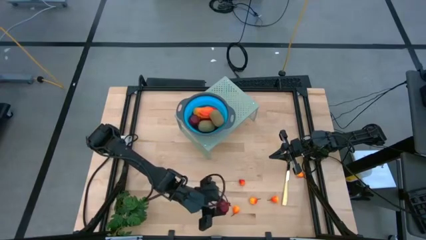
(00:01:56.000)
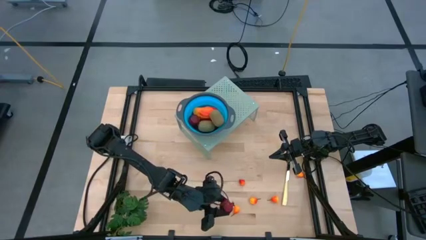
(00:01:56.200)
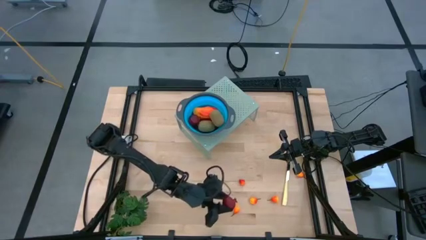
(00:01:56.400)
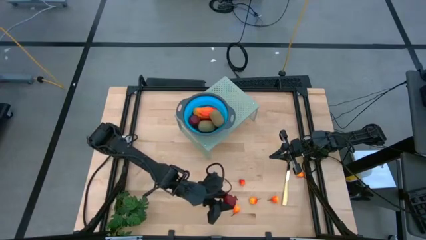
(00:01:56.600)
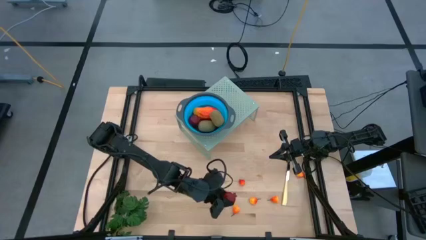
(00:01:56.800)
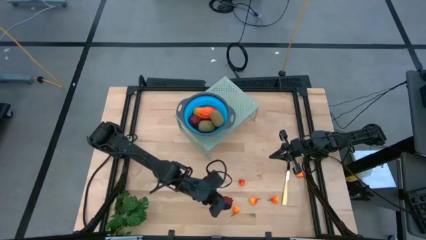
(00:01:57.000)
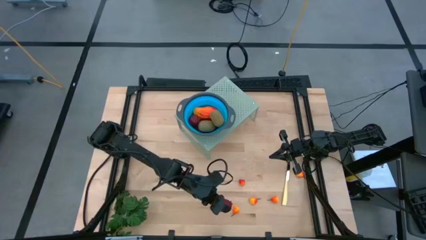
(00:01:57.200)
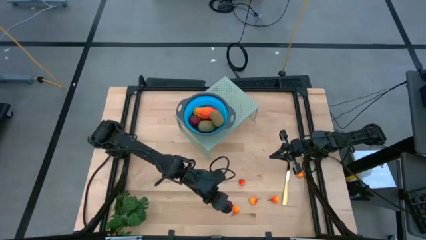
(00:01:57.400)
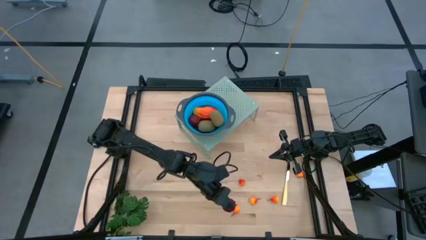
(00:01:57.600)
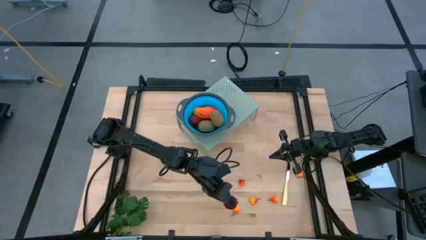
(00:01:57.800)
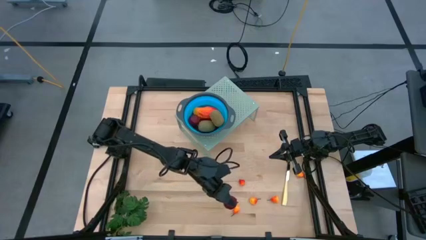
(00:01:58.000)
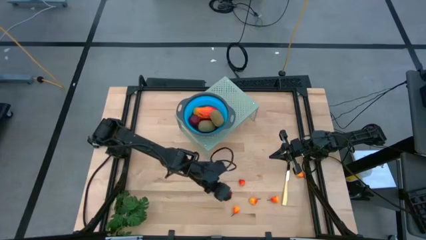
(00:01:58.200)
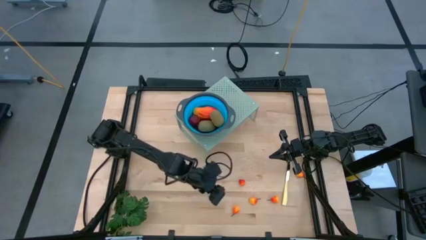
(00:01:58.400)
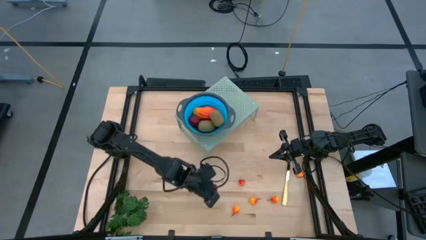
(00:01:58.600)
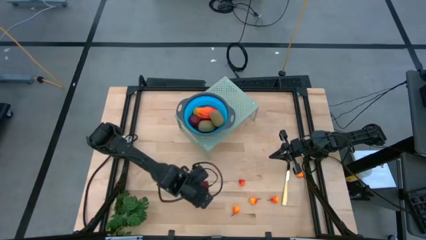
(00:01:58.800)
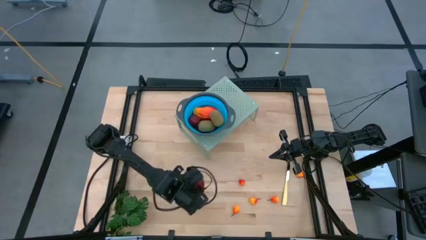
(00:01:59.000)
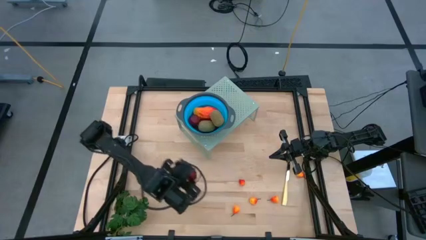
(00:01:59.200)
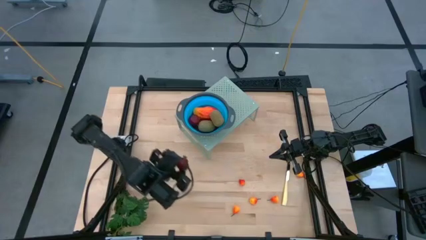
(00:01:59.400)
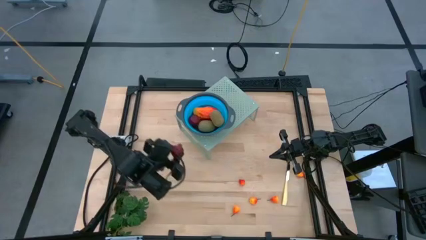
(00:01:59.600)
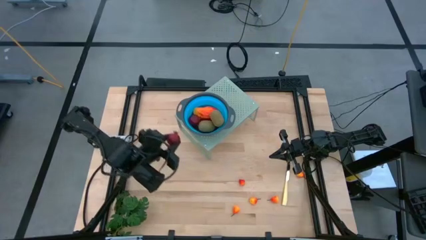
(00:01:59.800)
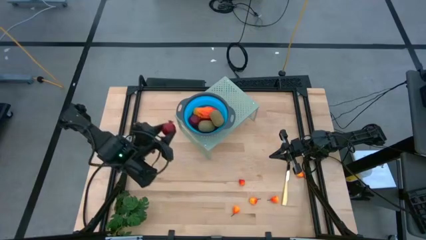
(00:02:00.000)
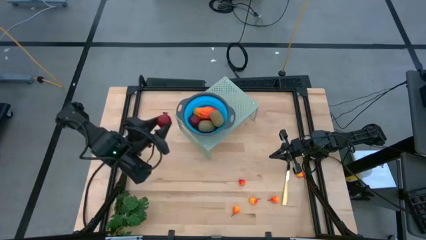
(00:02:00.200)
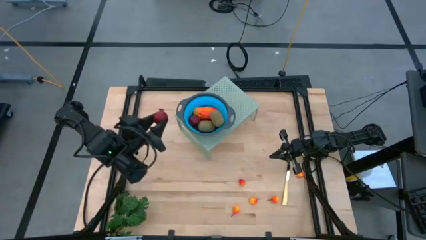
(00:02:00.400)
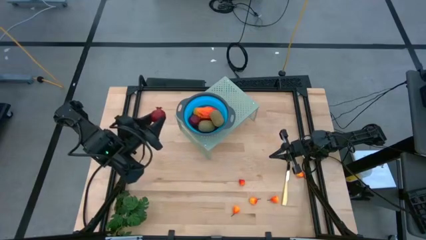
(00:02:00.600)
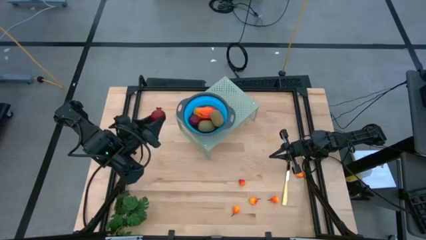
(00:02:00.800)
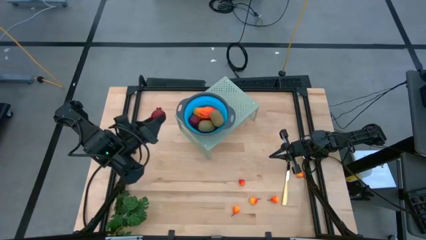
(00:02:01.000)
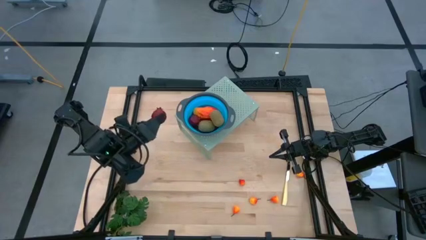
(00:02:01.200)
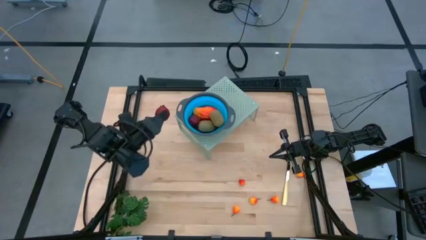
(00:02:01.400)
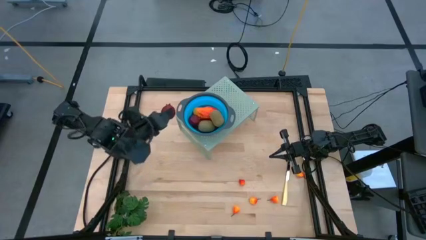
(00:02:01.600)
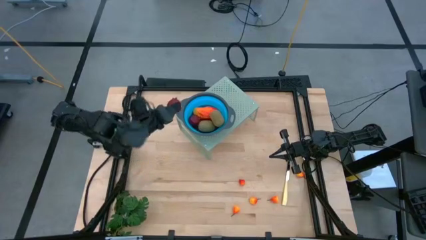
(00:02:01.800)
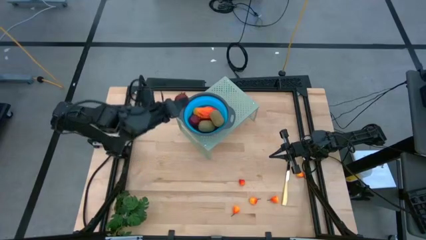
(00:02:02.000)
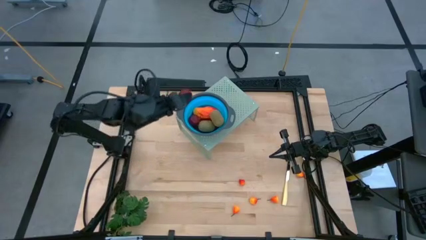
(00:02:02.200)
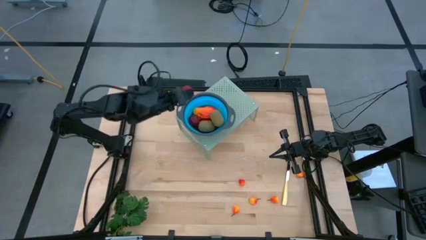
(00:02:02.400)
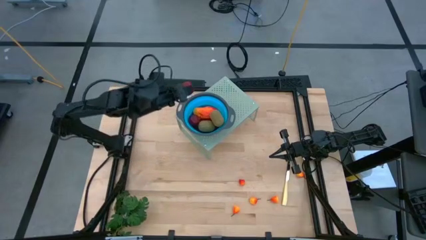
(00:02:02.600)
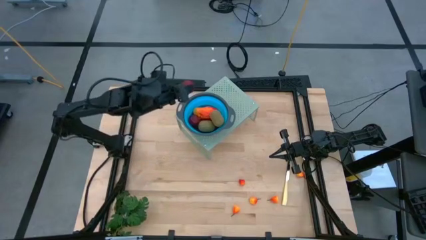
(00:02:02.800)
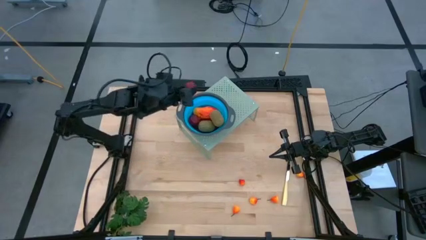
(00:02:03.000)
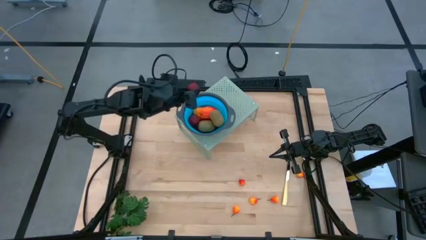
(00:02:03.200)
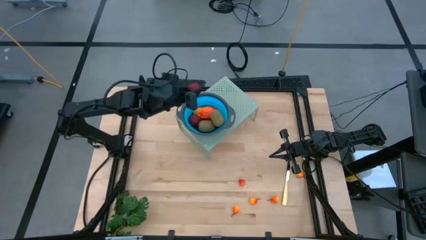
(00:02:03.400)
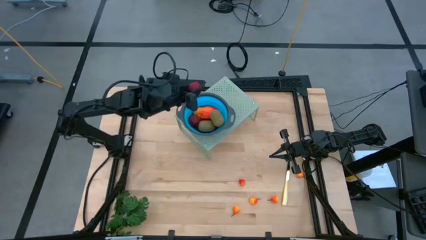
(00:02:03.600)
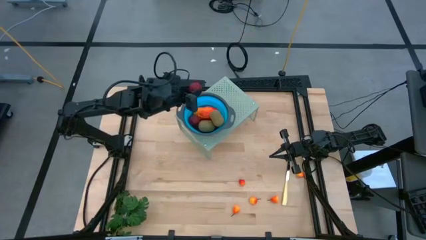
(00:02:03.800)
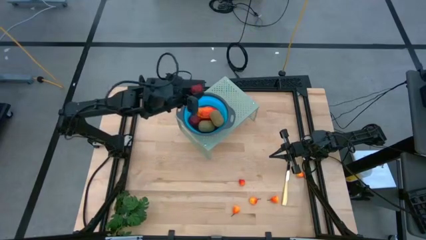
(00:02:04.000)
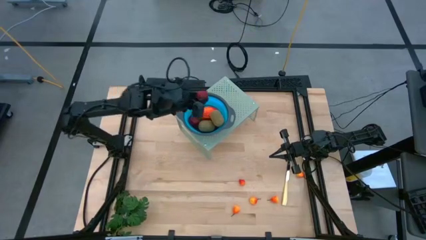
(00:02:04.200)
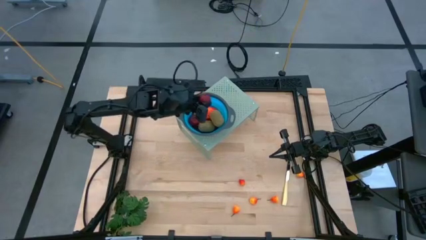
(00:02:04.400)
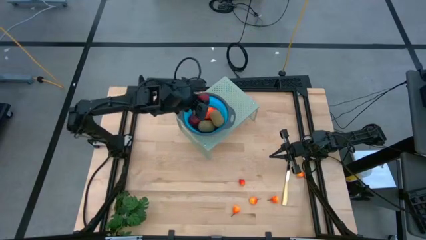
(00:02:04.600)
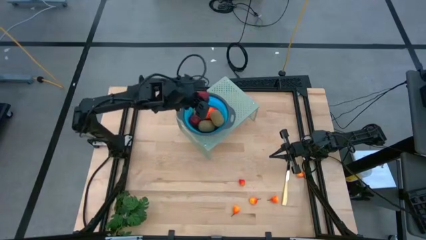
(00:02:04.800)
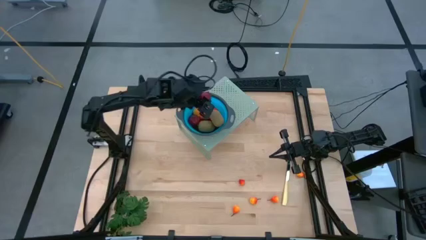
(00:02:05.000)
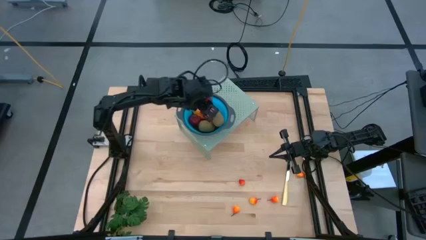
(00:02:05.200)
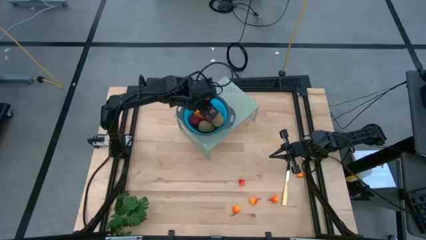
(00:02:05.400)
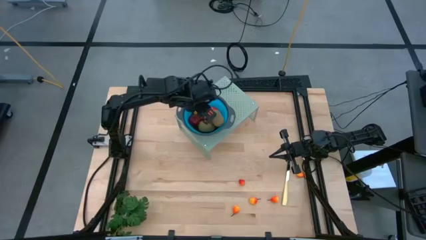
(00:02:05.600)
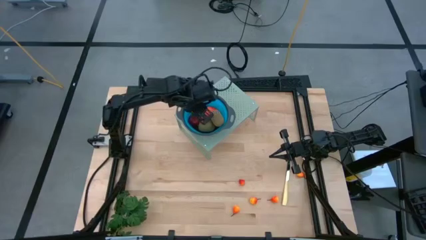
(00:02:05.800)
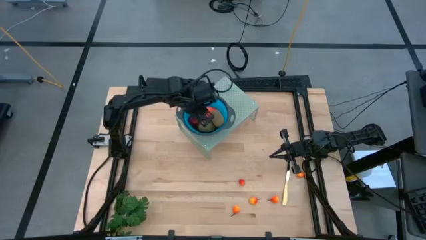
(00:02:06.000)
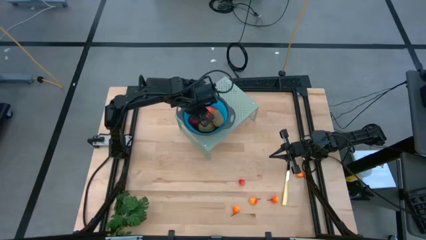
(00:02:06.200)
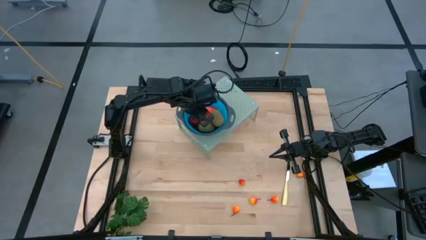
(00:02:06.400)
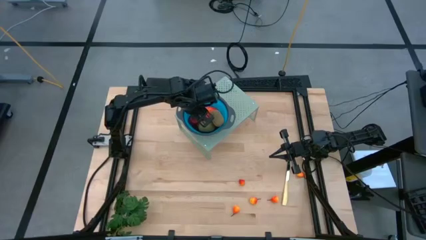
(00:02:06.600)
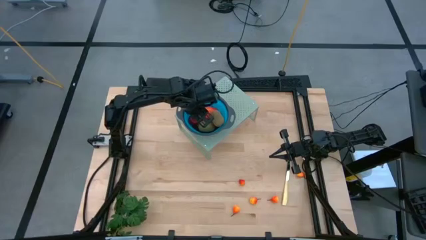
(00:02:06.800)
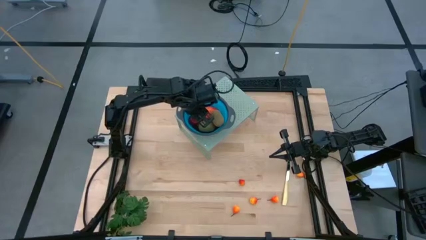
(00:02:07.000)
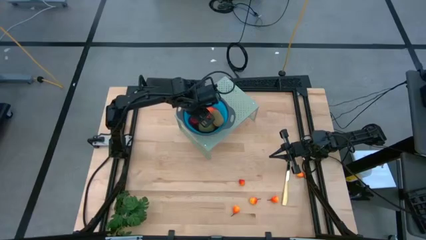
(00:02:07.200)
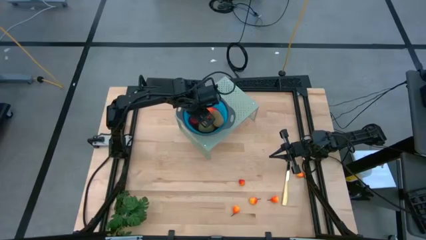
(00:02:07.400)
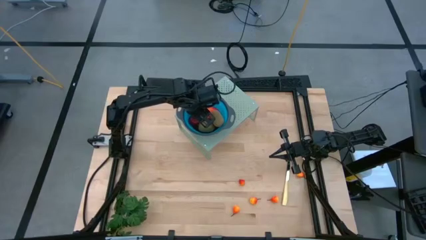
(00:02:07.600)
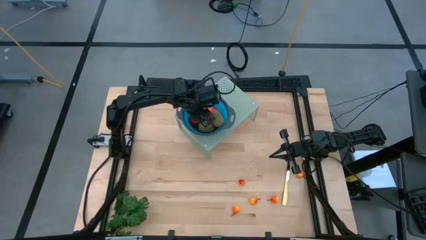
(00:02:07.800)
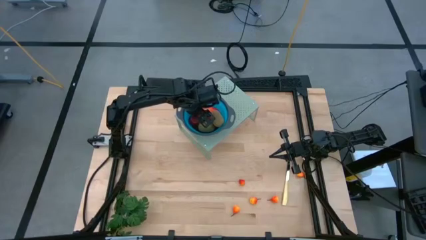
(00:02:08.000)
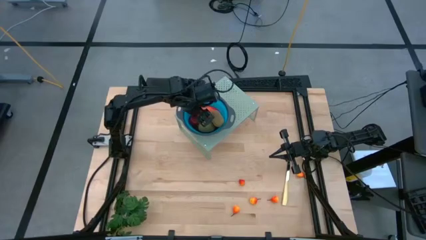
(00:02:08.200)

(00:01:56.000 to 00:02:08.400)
Task: Pick & Place Fruit
Put the pomegranate into the collapsible colander on the shelf
